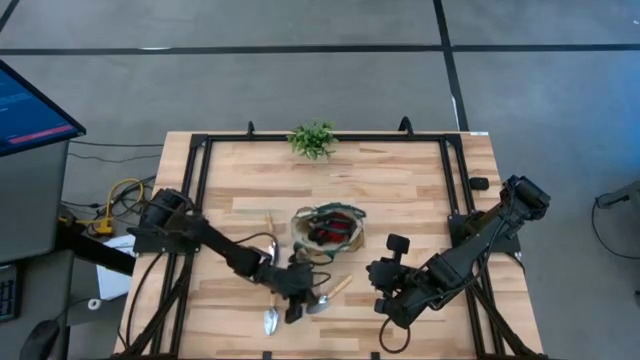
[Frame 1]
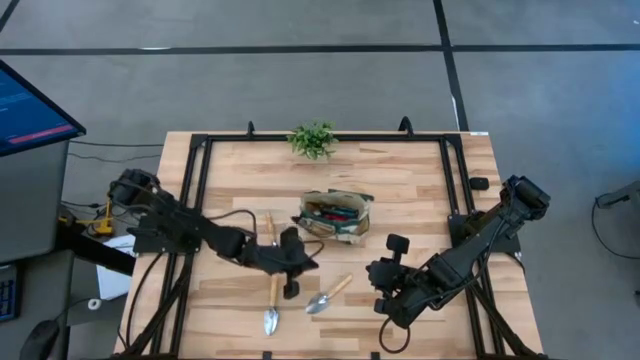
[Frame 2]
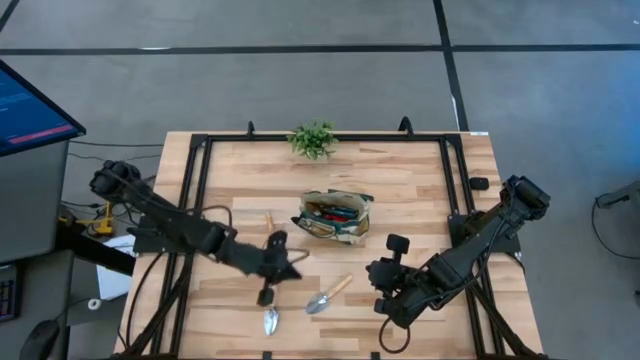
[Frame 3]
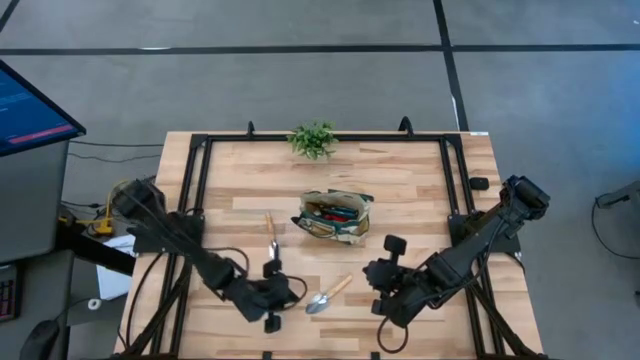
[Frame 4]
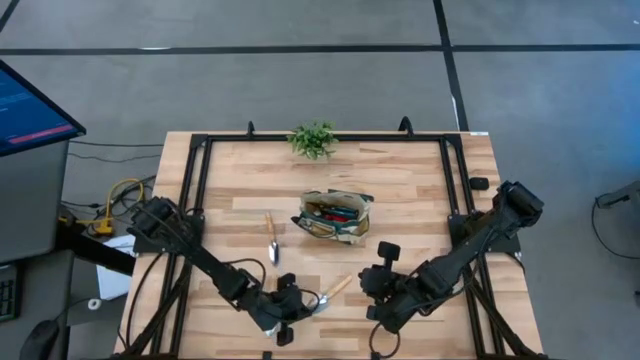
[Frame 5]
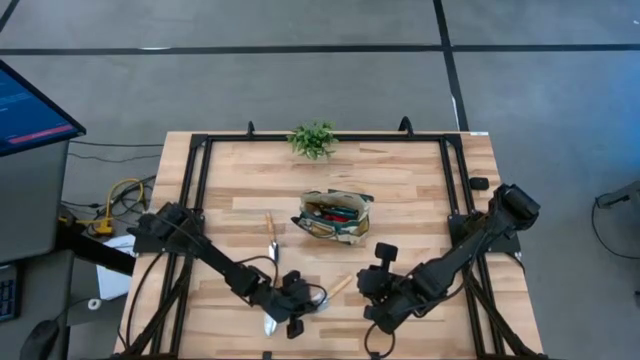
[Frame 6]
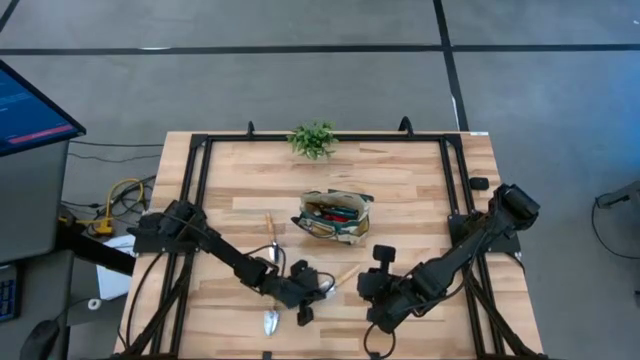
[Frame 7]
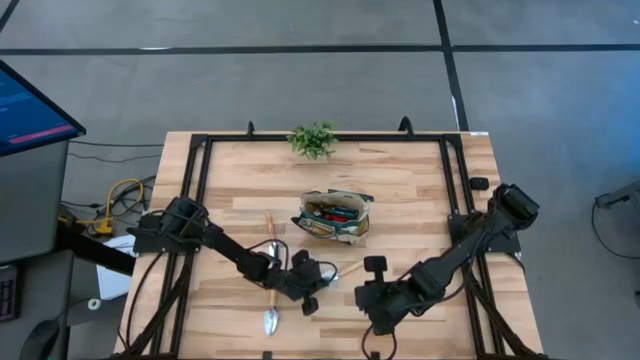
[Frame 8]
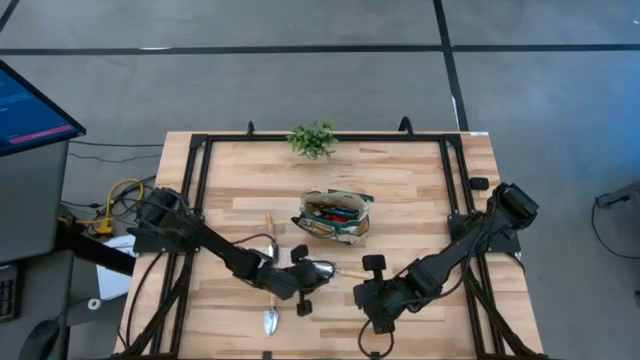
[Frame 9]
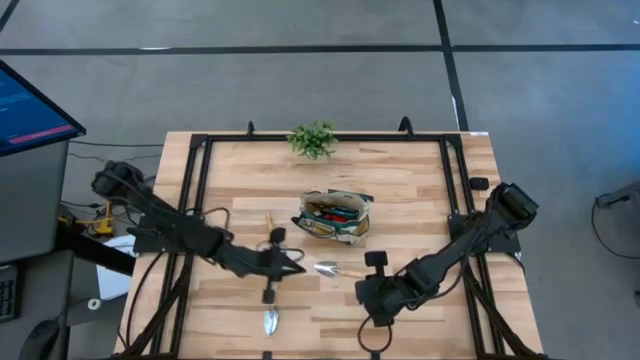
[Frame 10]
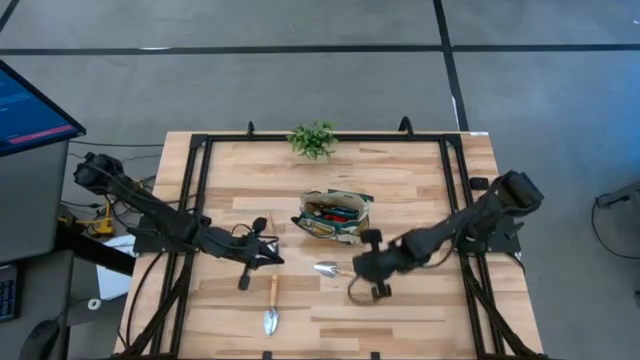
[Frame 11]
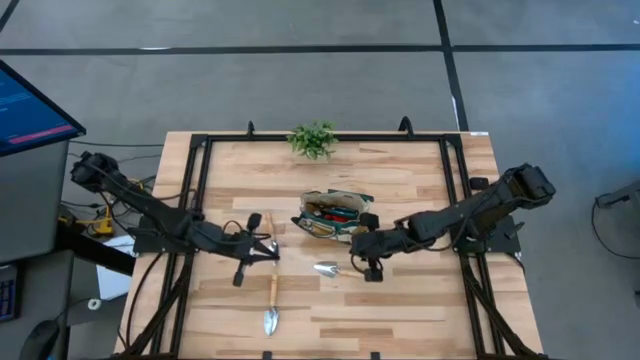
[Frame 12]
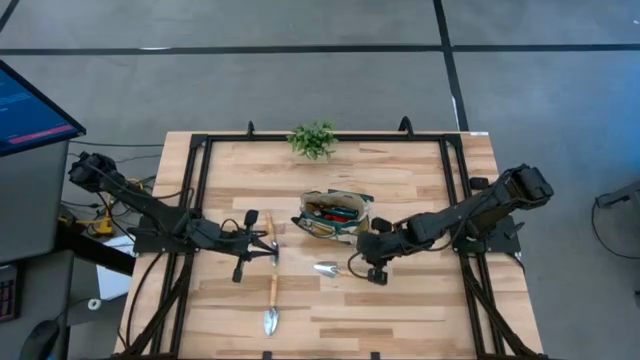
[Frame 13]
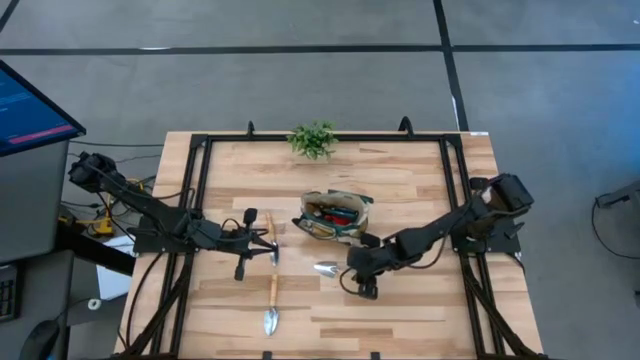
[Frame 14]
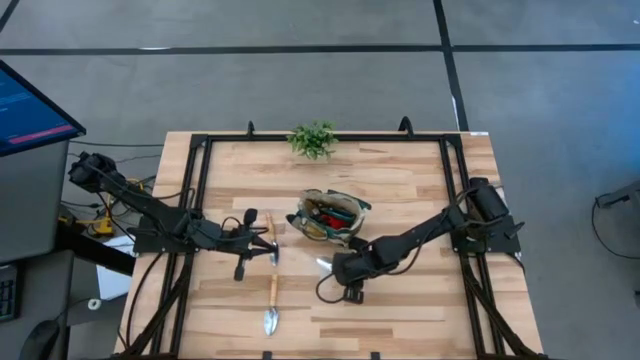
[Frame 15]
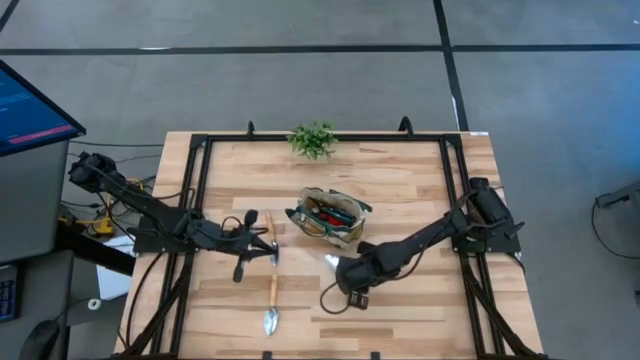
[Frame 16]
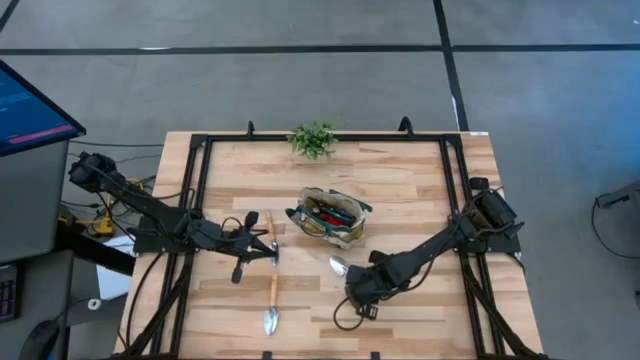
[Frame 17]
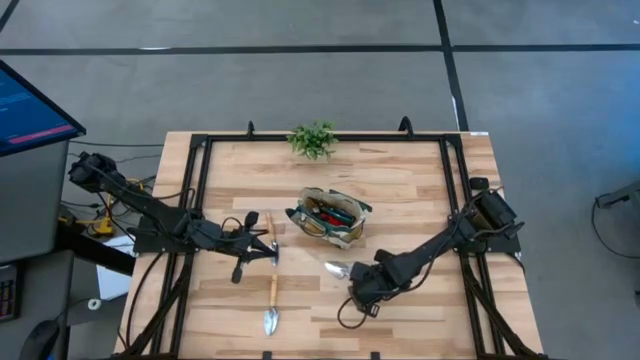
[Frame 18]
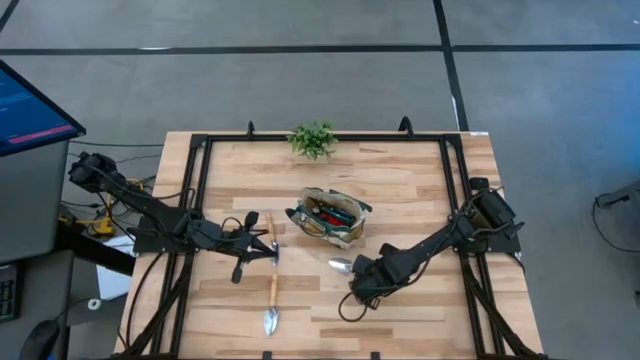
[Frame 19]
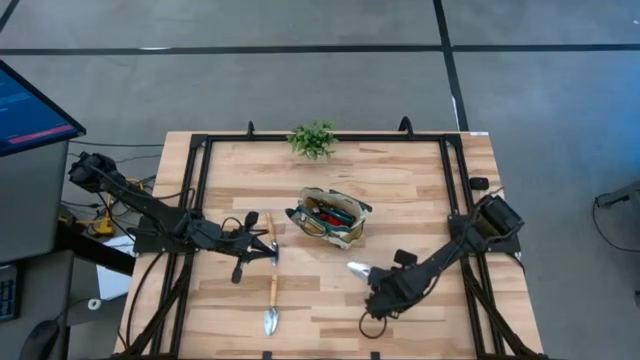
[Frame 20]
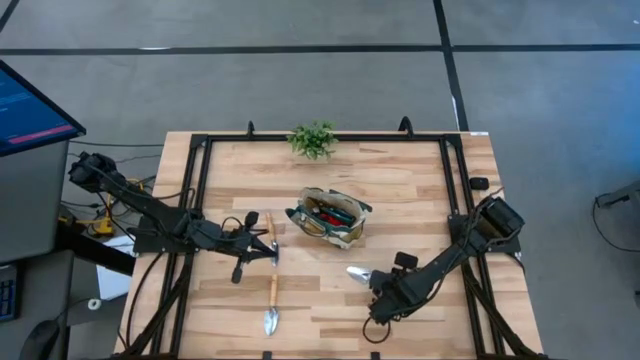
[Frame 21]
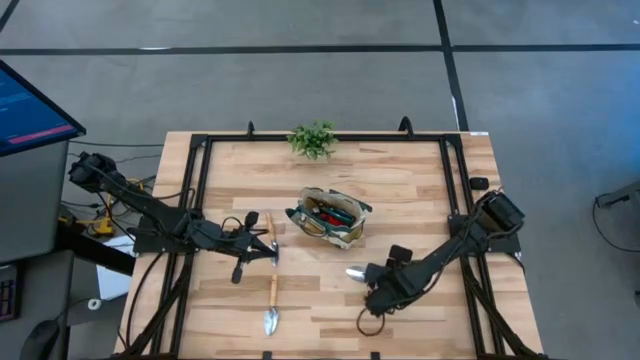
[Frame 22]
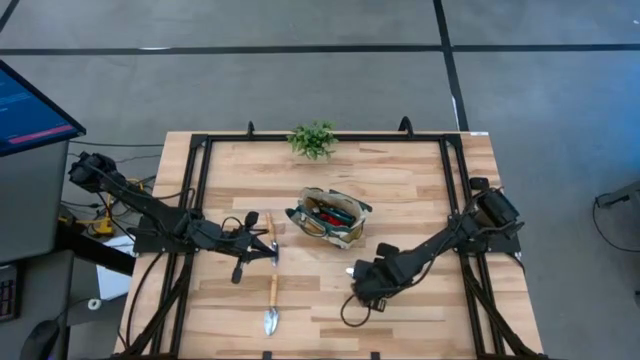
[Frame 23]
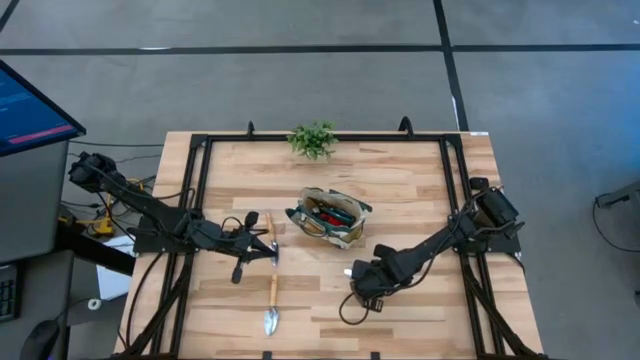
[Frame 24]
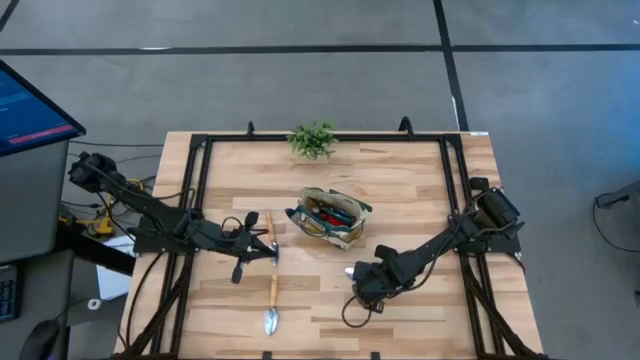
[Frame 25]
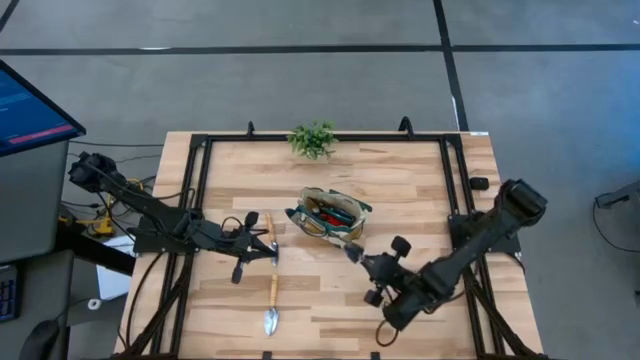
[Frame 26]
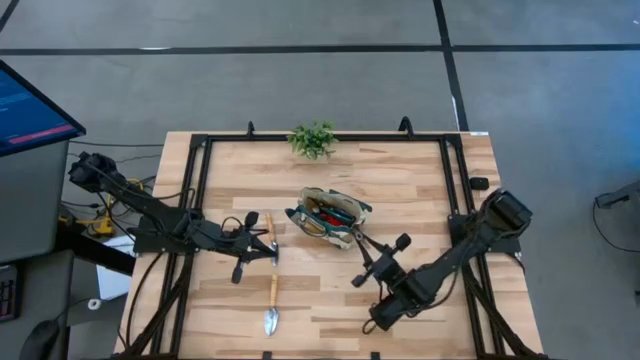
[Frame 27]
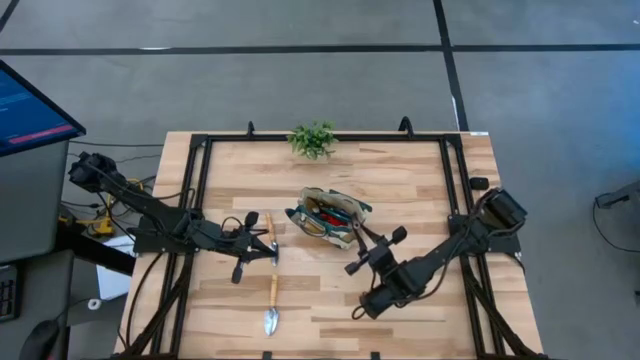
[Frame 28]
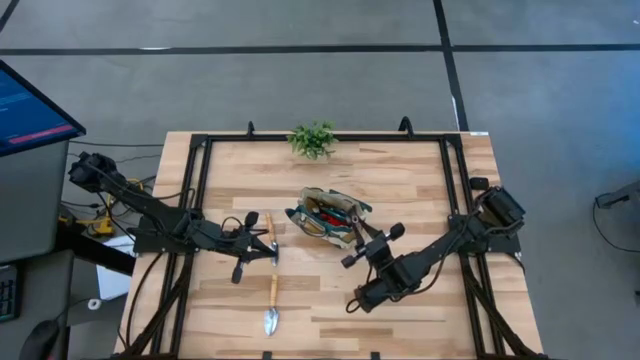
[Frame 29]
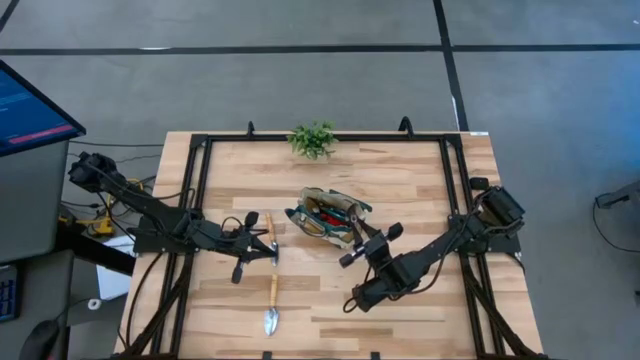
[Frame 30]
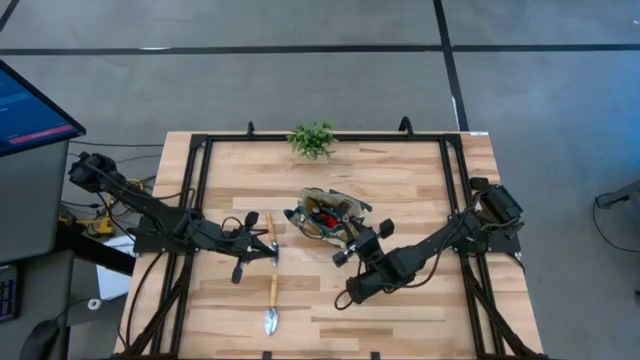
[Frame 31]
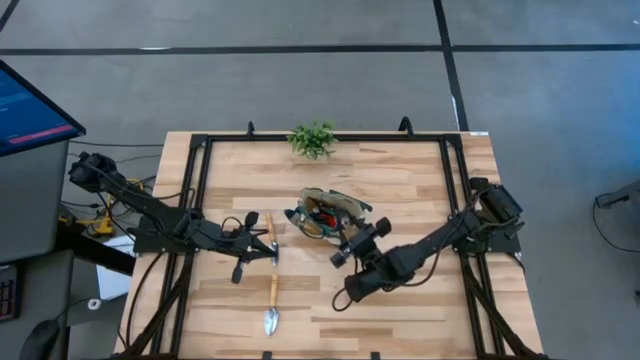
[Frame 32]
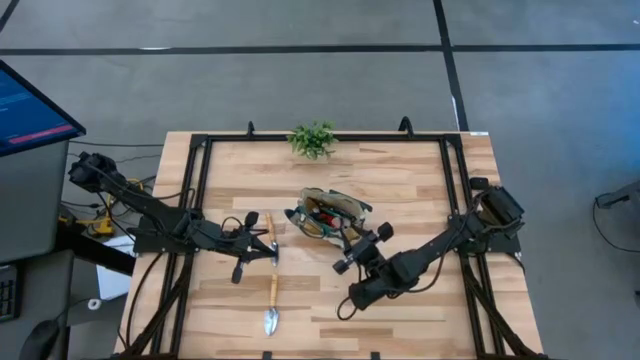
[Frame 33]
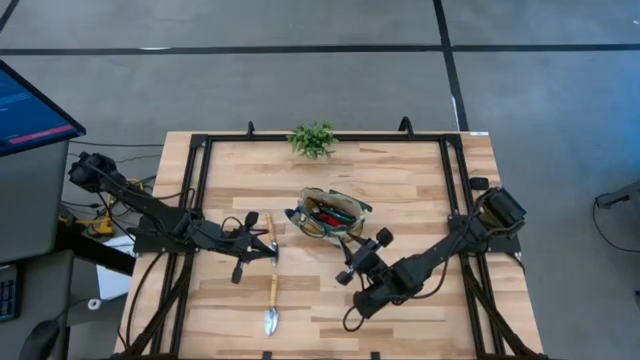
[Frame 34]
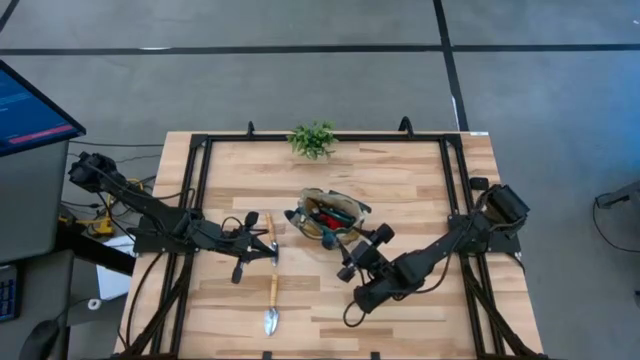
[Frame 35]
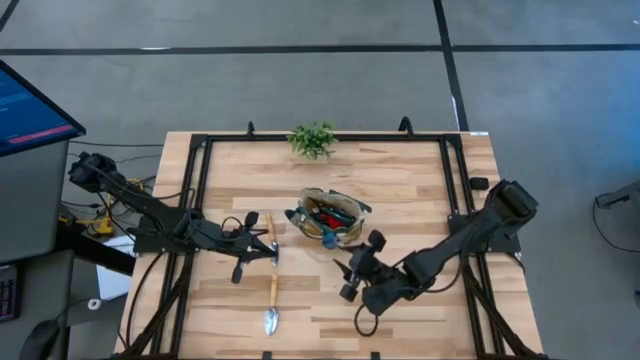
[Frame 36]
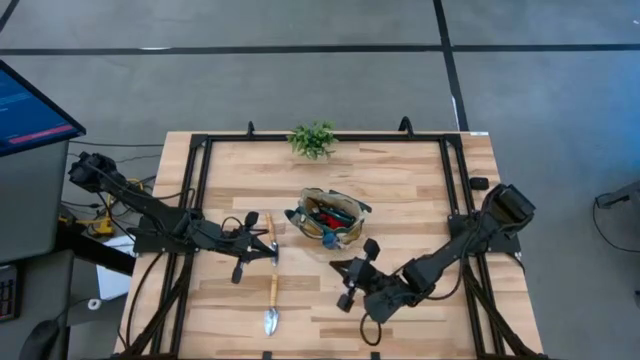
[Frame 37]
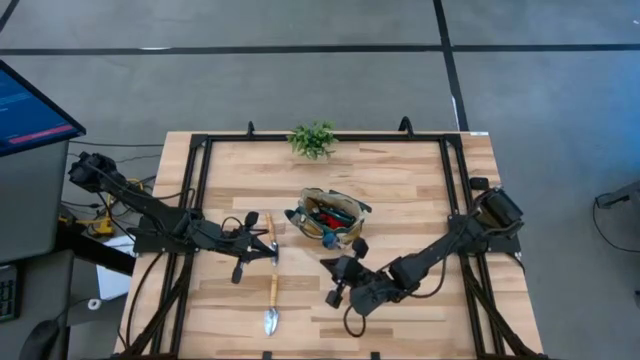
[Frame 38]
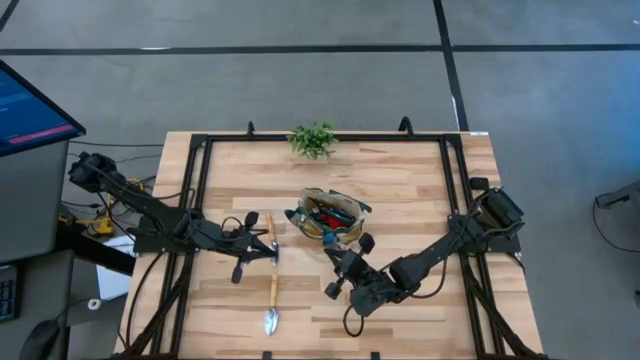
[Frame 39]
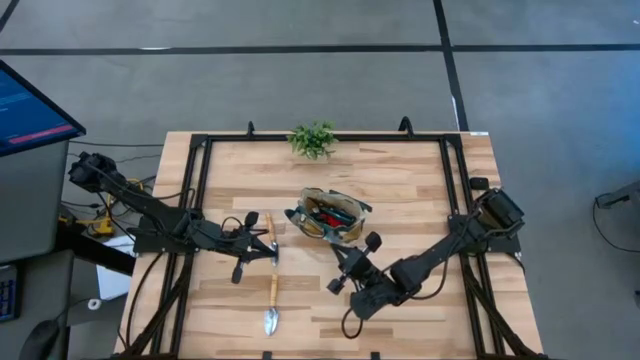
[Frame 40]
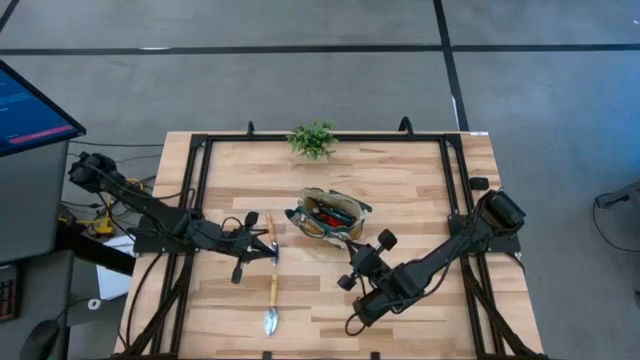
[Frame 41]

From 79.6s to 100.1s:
Task: Pick & Place Garden tools in Gardening bag
Put the right trowel into the gardening bag
